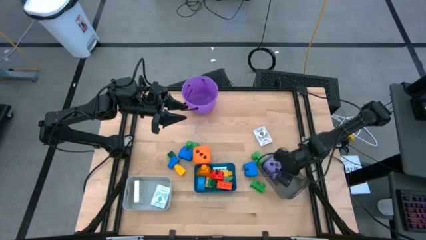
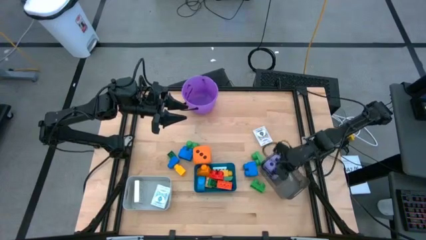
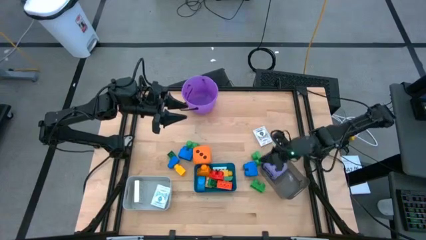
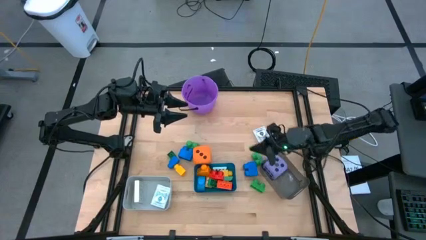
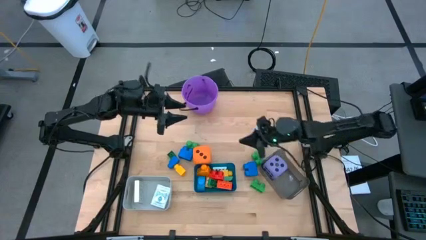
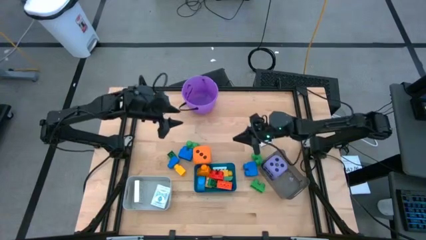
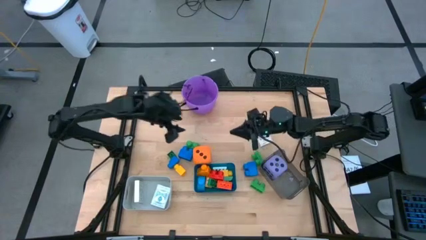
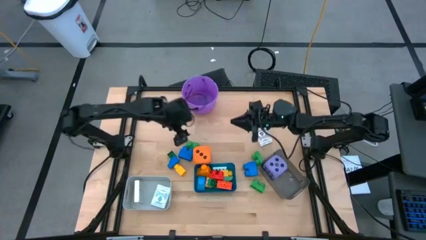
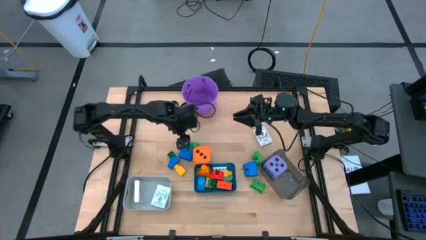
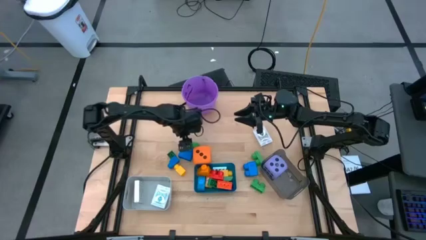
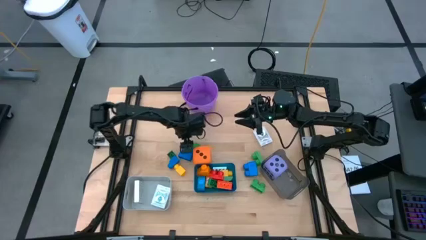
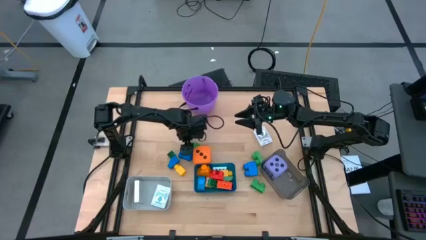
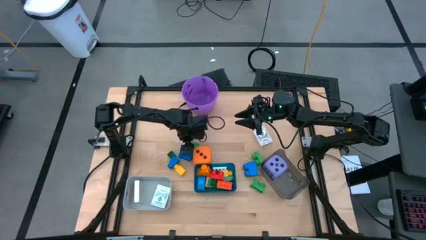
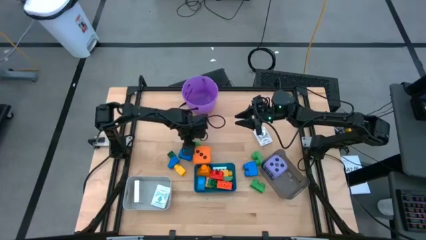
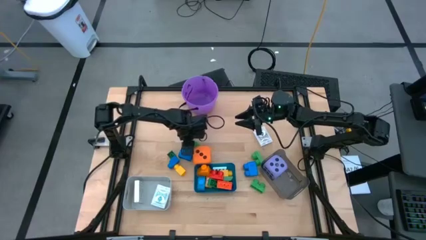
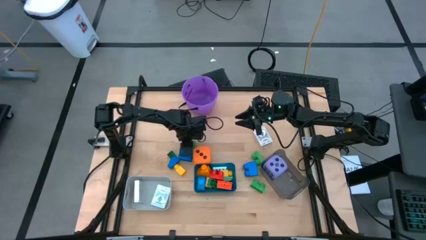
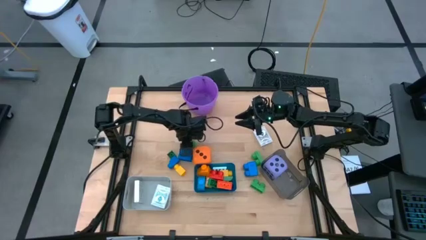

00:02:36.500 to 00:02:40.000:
Task: Pick & Place Toys
Put the top left green game piece into the blue bin

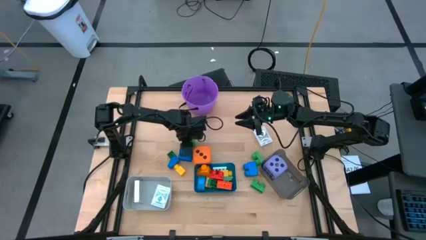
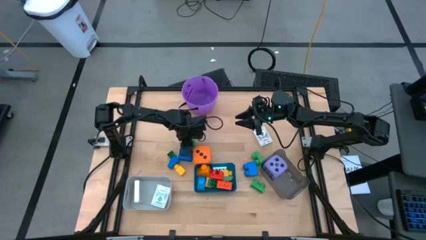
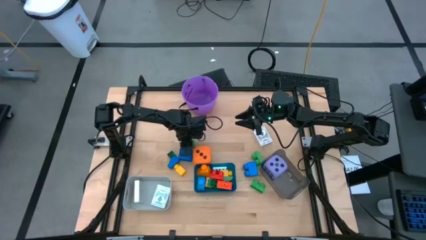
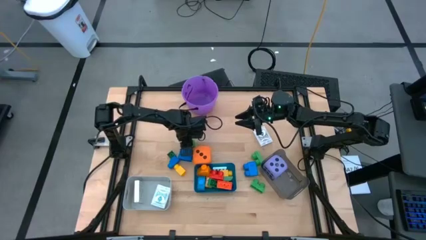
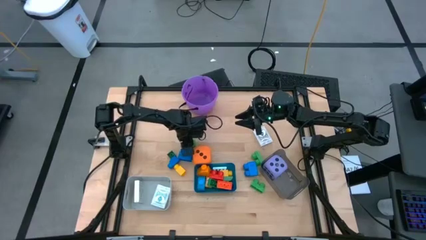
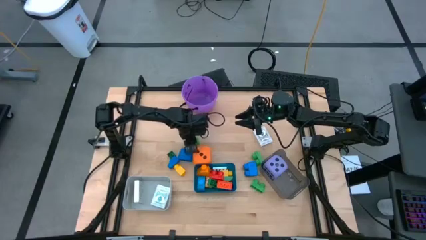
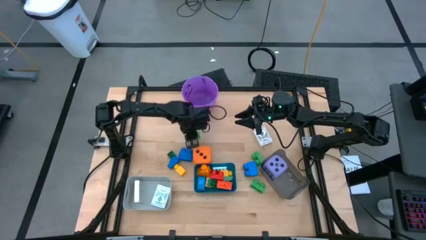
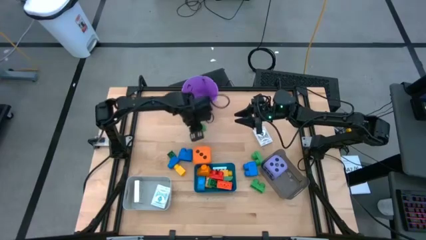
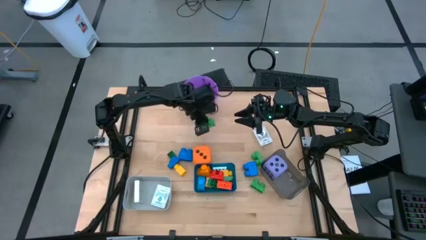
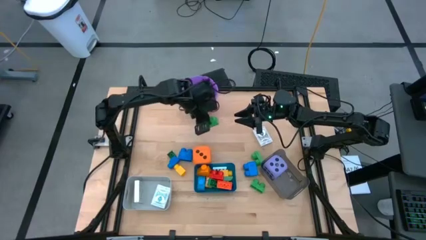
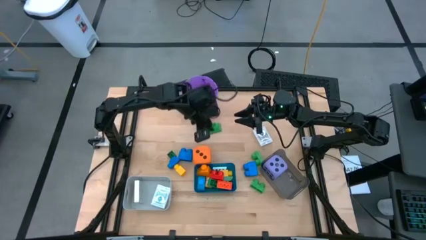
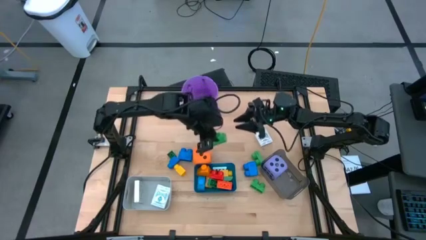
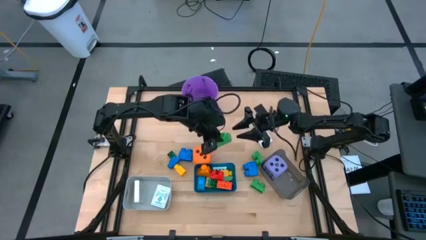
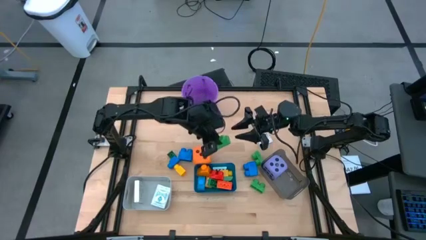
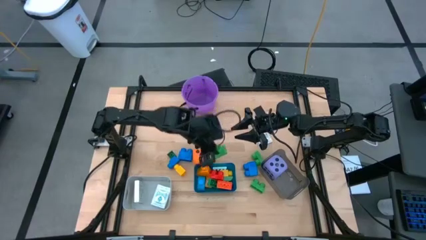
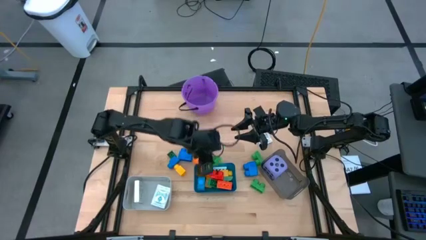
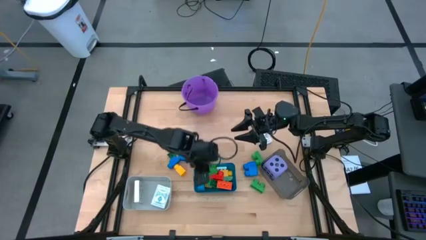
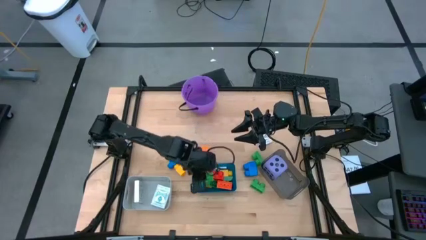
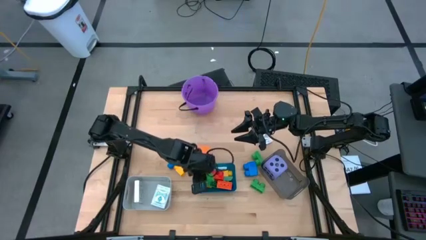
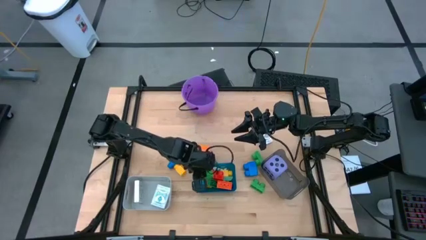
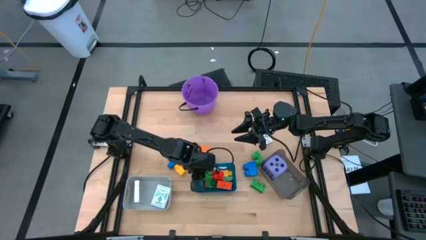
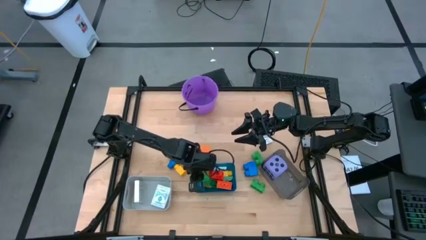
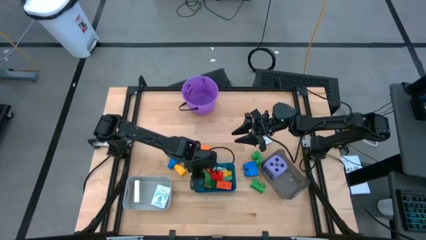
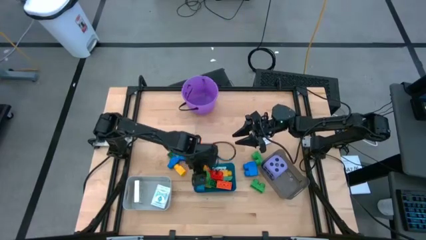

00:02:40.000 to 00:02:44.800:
Put the top left green game piece into the blue bin

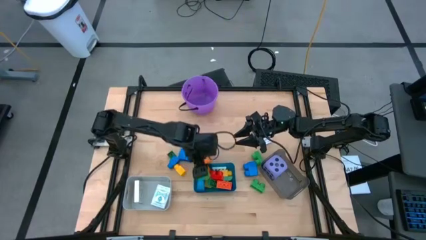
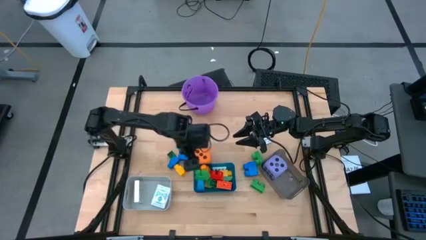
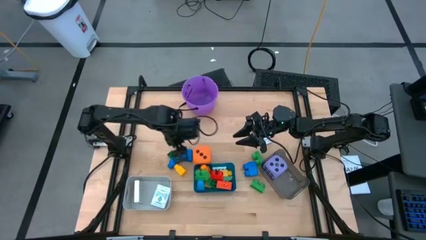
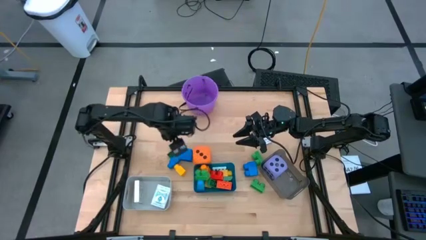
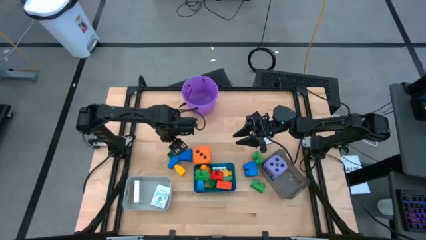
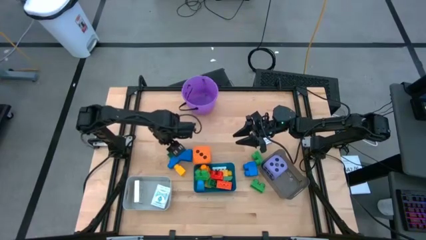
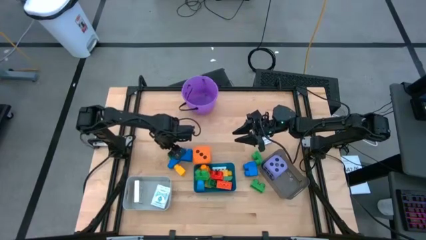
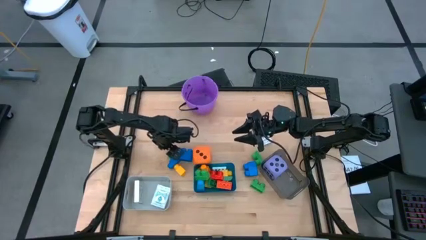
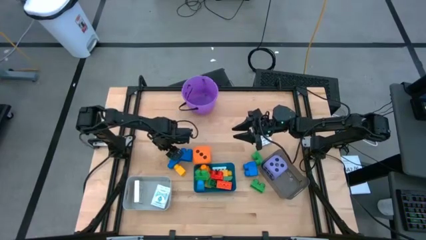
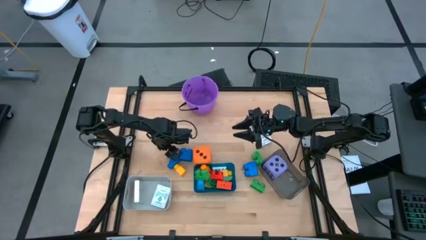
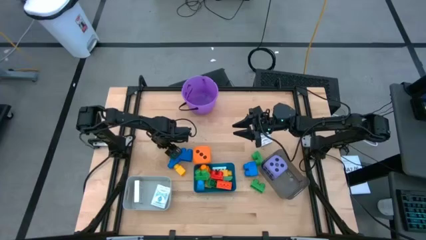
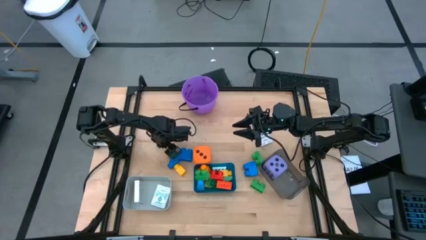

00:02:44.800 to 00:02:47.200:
Put the green game piece into the blue bin

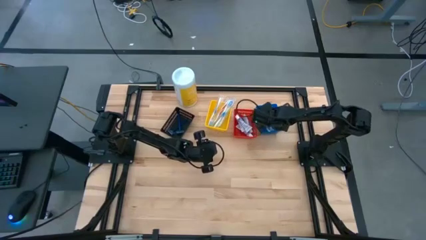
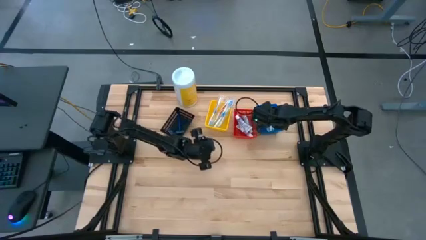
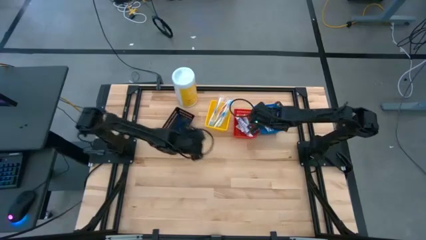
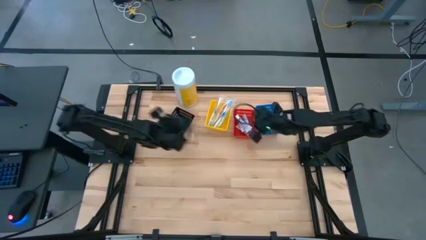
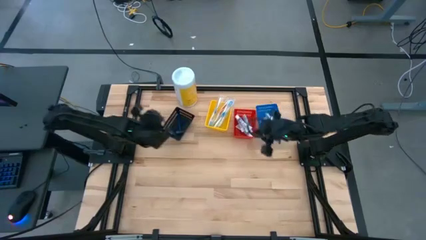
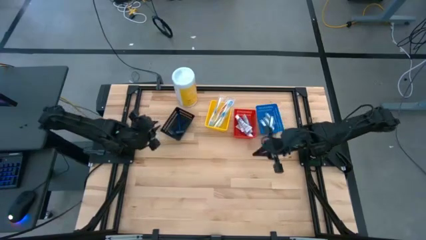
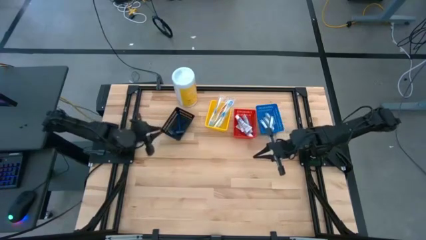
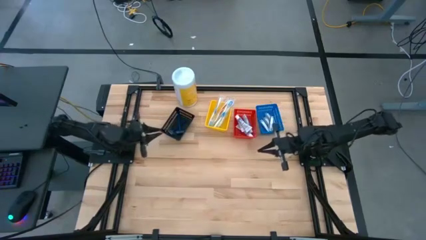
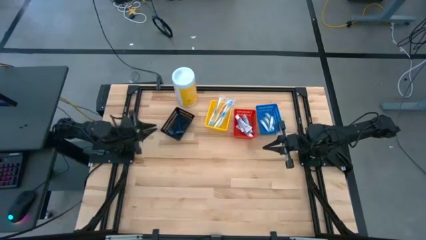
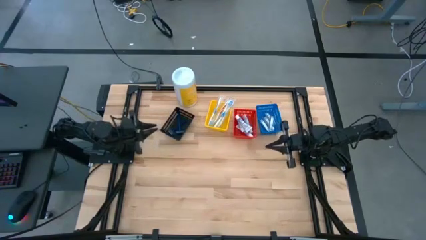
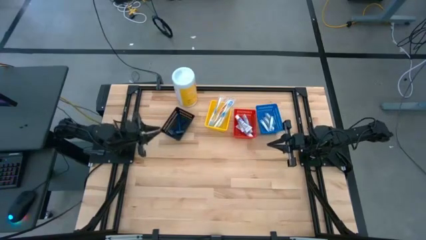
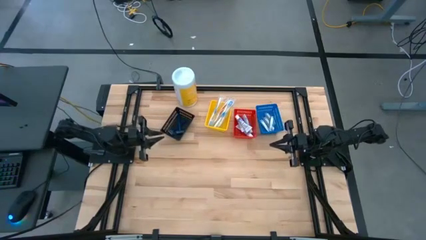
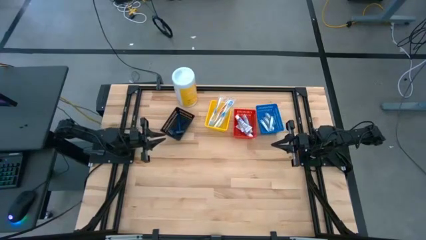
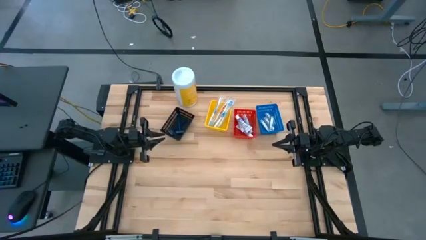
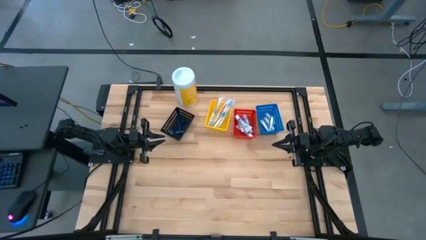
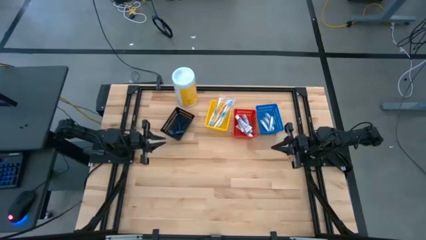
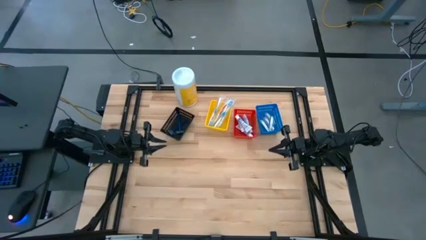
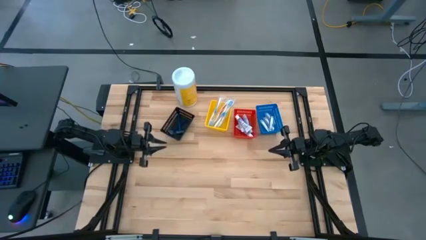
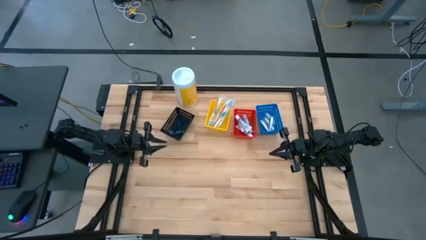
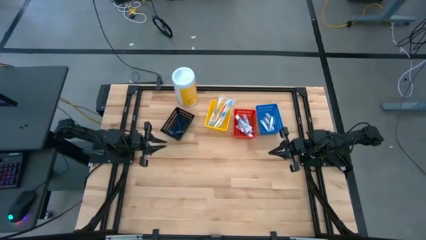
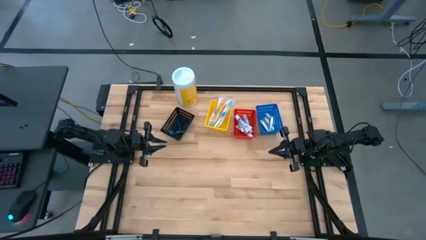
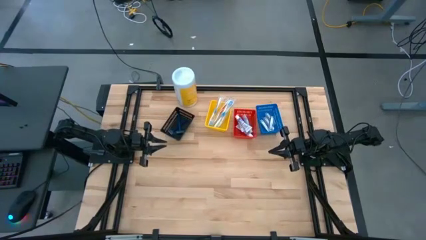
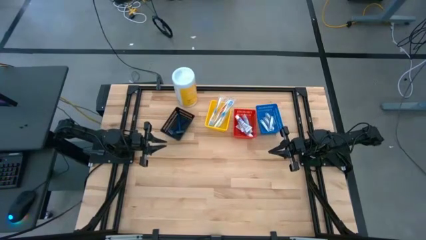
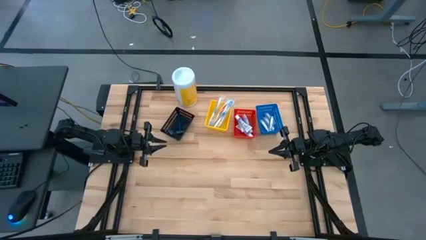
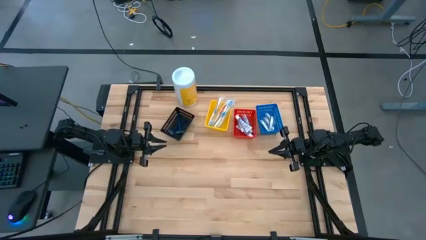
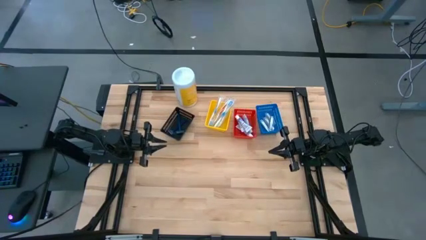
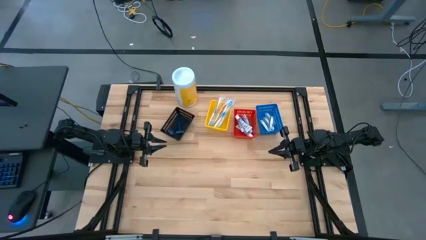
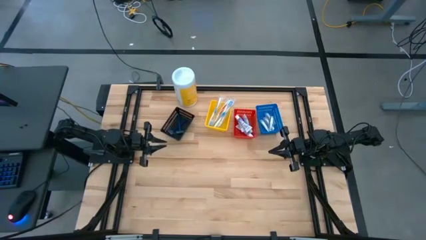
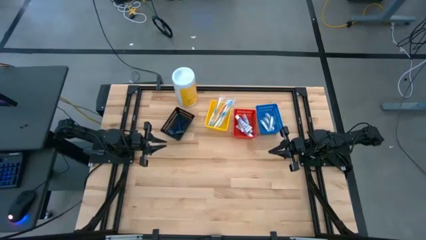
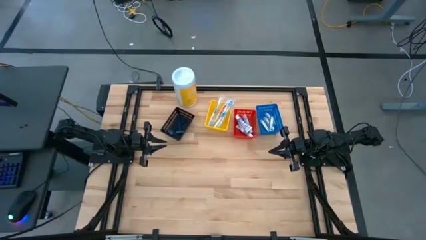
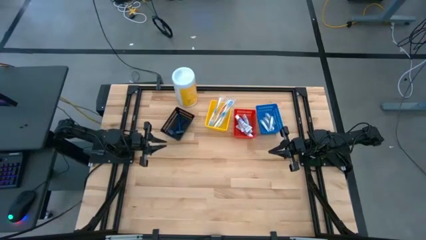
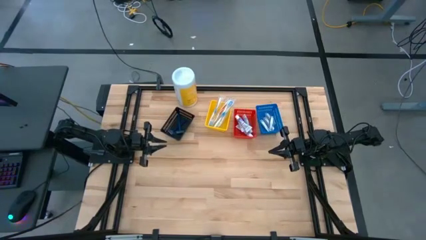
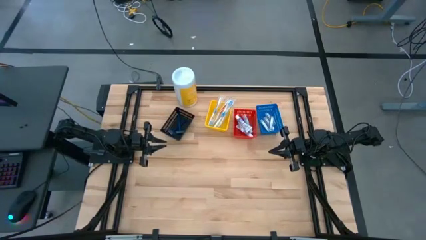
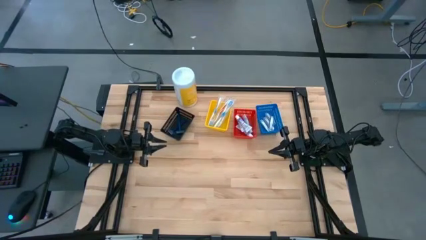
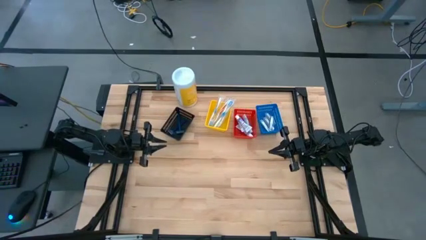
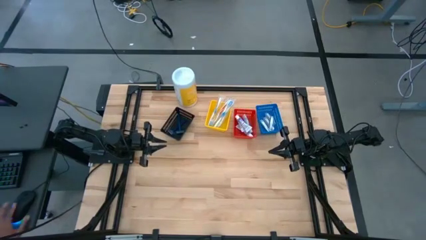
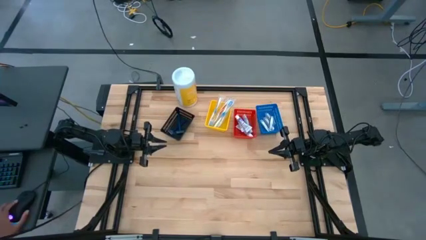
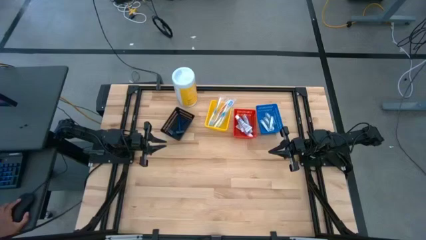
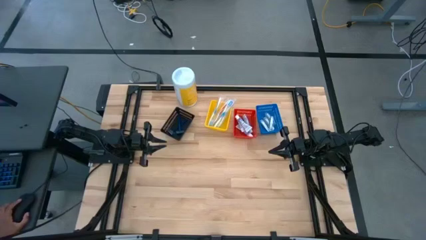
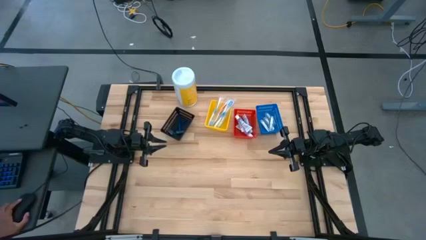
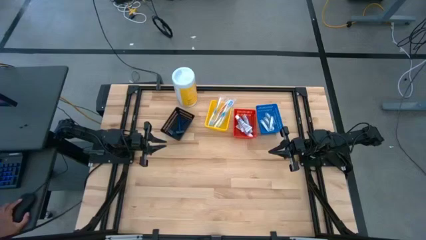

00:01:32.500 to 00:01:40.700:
Task: Pick & Place Travel size toiletries
Return to home position
